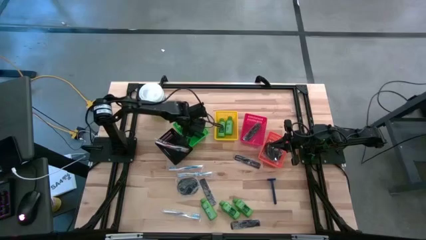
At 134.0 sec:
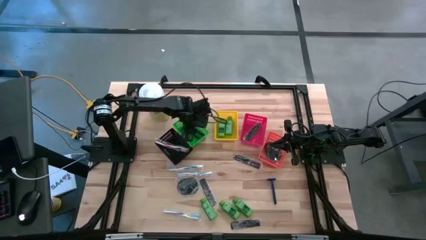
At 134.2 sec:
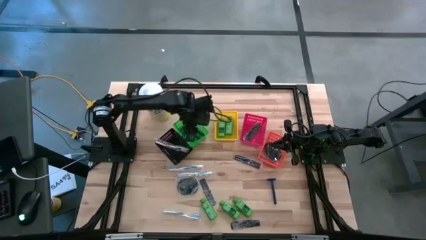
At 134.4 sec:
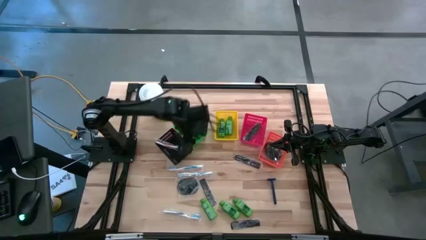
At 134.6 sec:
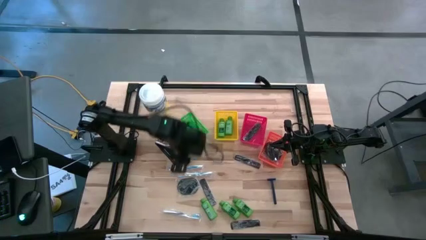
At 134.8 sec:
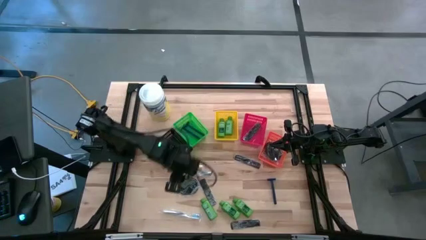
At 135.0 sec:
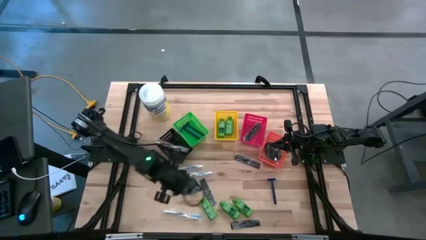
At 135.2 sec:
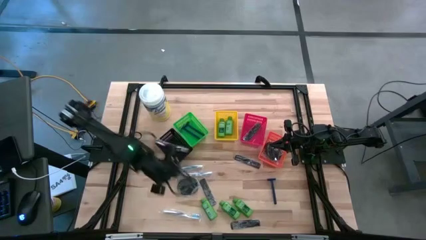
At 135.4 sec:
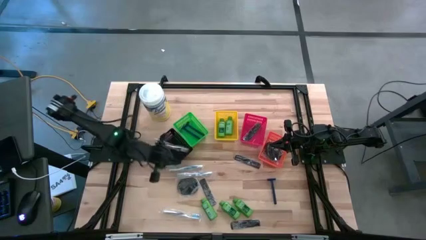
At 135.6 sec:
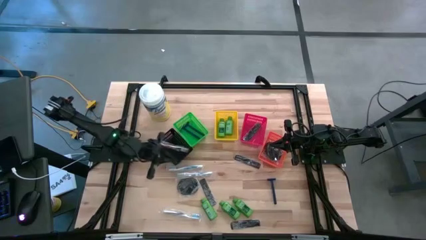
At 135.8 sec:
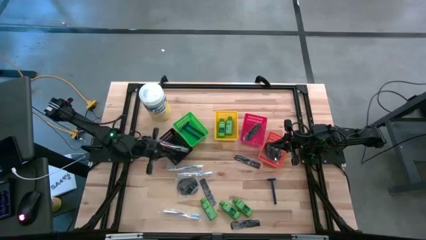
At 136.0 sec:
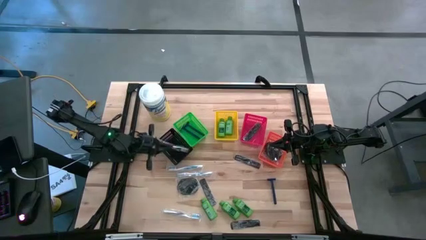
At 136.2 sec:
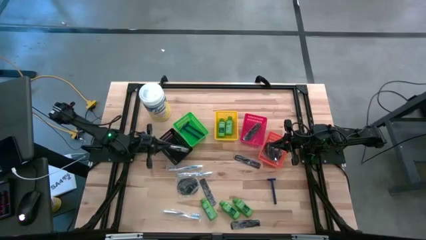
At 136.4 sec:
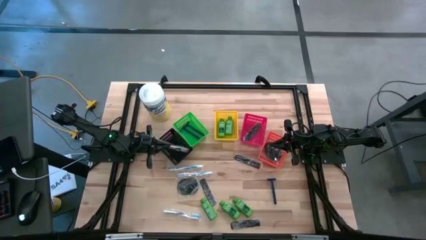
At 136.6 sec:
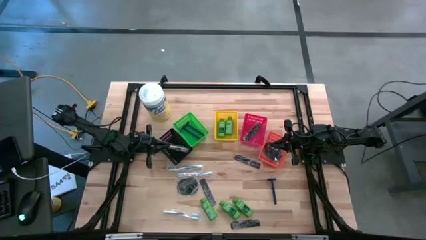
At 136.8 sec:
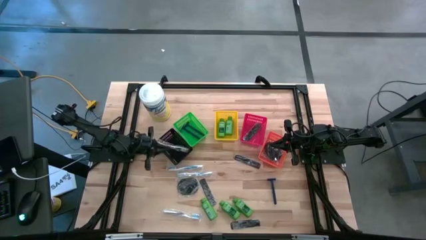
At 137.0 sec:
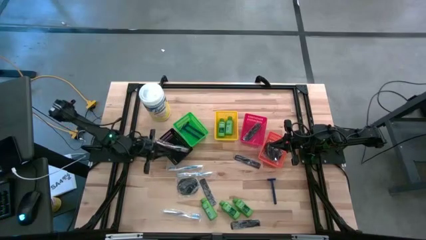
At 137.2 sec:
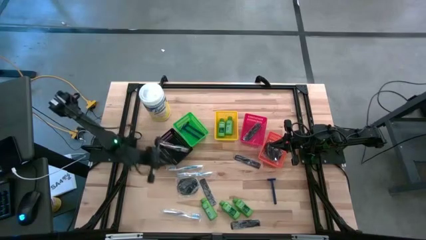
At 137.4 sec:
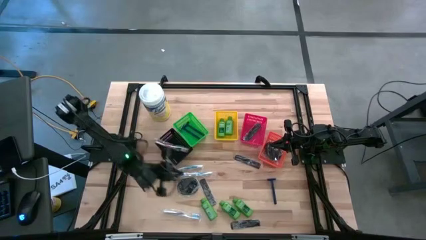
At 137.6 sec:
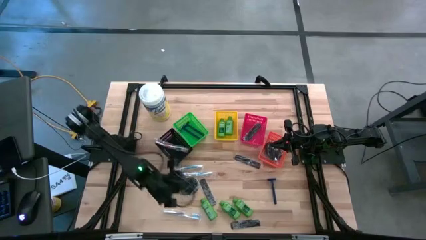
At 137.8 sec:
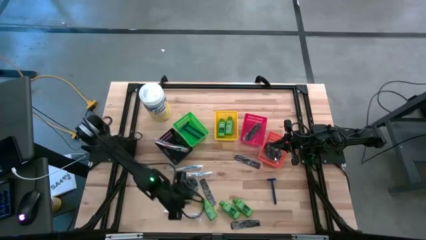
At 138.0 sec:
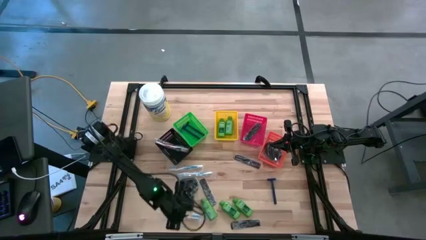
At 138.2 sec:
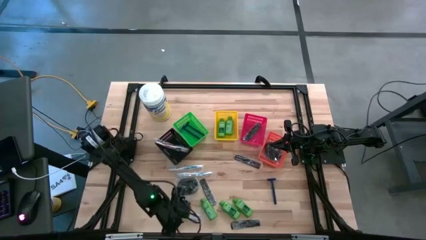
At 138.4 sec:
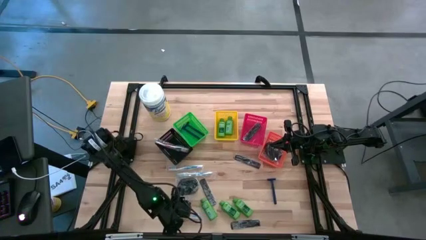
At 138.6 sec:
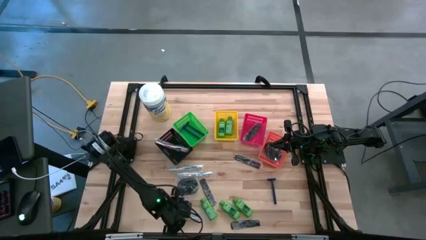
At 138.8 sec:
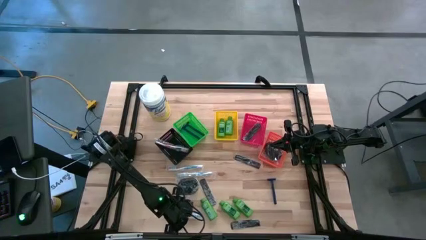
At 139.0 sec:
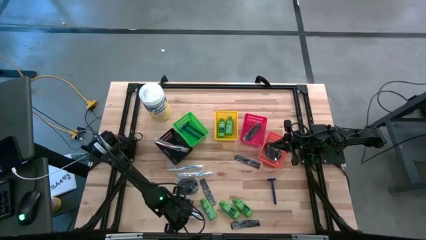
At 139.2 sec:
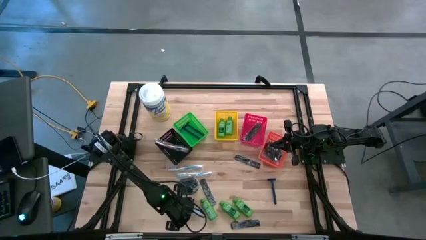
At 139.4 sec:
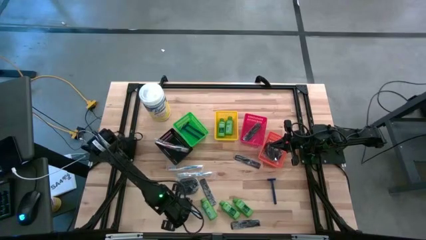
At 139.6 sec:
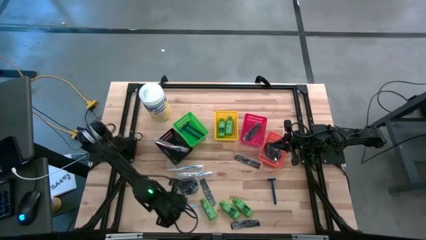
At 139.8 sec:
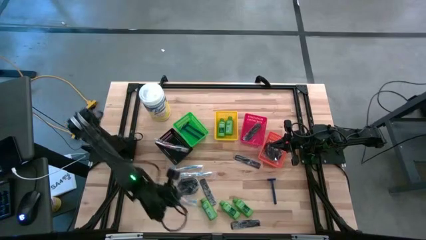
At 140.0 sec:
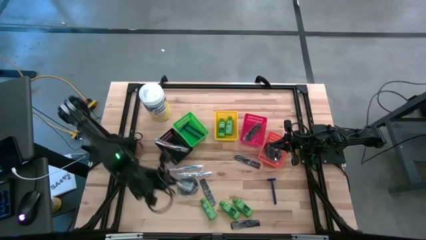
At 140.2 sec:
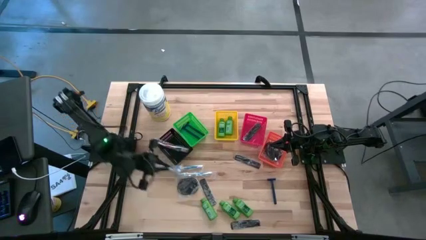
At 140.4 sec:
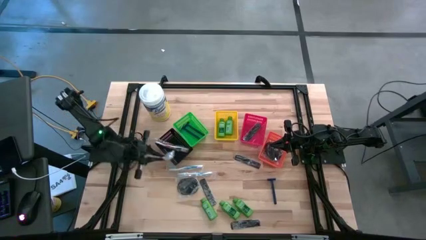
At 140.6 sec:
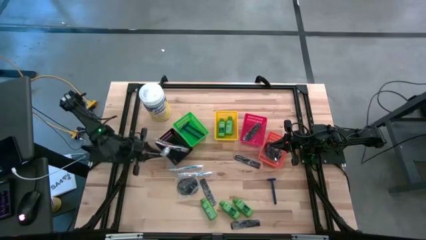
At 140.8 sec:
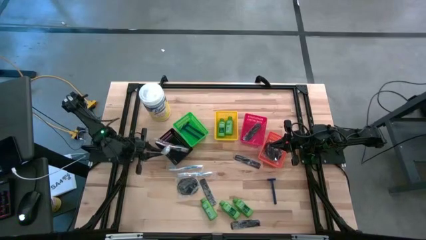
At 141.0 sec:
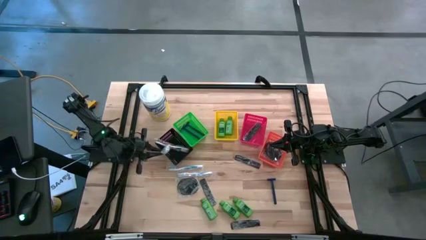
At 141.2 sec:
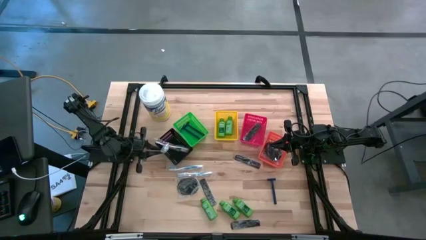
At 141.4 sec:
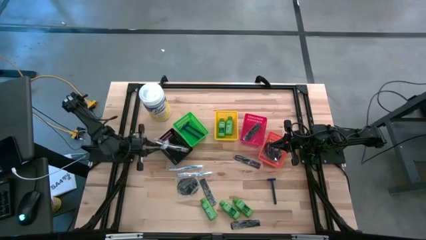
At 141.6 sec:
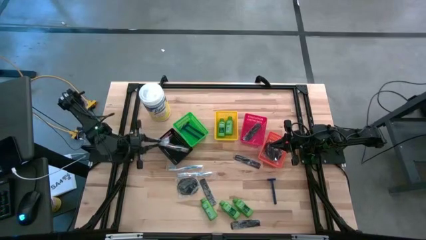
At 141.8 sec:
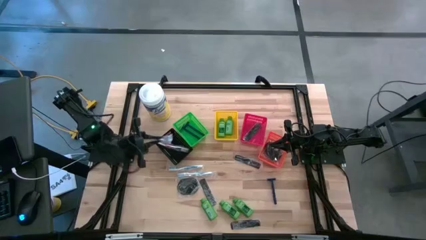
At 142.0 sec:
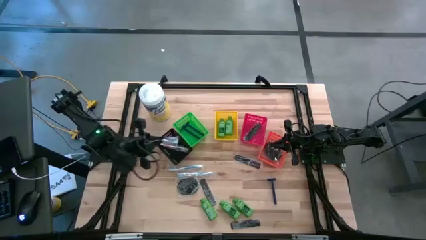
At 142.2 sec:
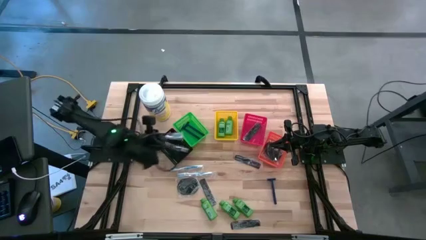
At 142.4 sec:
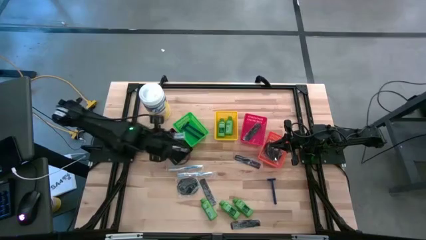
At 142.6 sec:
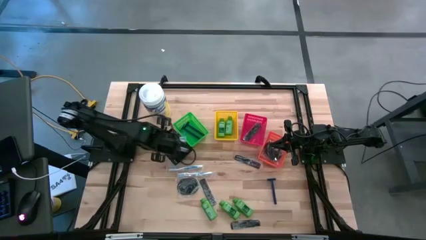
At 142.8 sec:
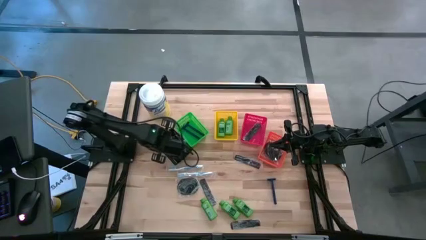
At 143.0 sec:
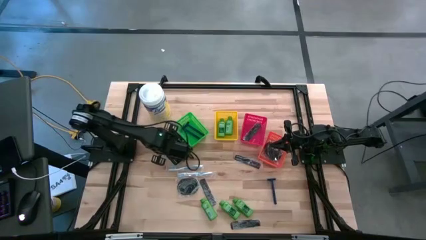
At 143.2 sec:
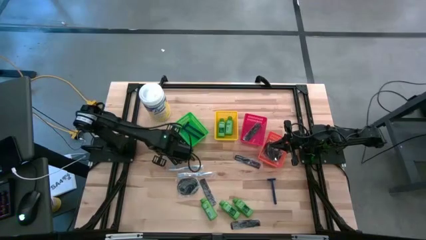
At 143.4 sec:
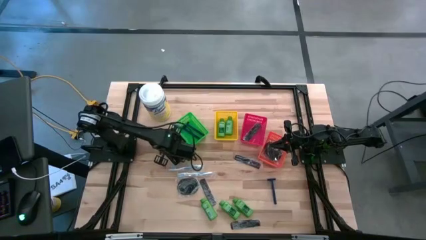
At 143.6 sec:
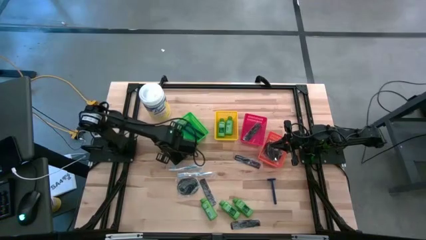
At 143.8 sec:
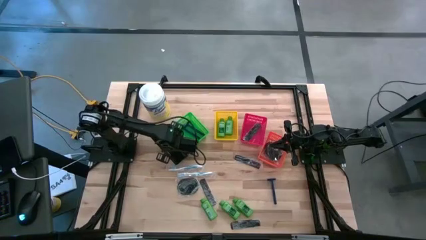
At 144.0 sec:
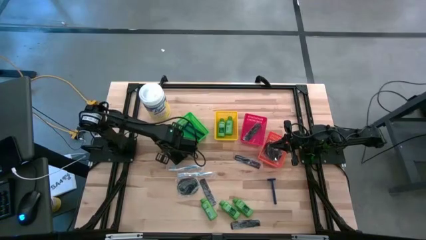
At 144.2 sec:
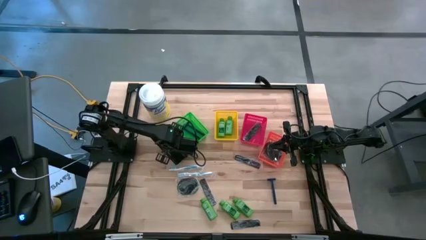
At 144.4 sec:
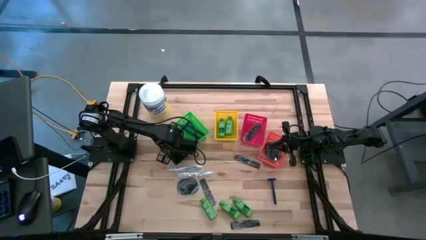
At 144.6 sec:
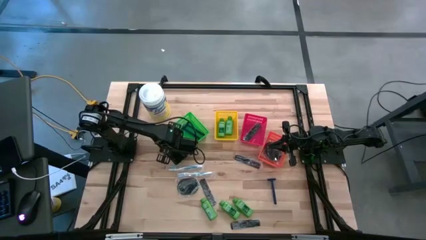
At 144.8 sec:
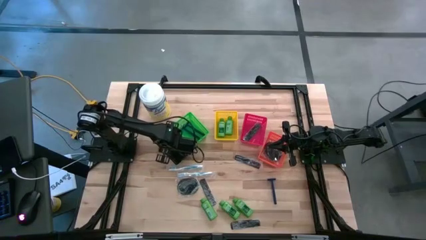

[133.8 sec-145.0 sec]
Task: Pick & Place Travel size toiletries
Put the bottom blue toothbrush into the black bin

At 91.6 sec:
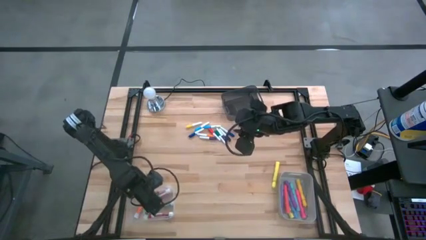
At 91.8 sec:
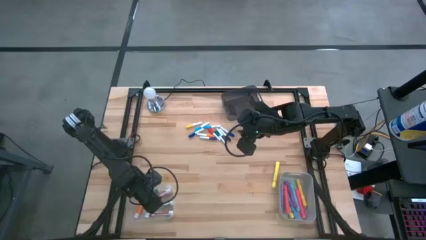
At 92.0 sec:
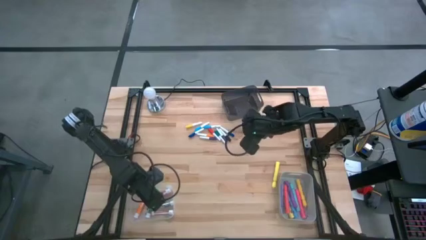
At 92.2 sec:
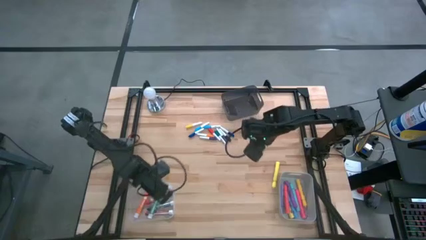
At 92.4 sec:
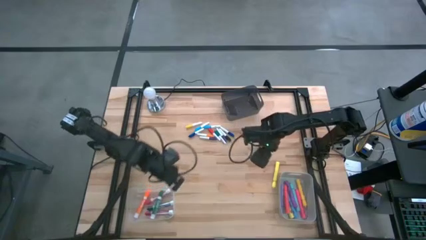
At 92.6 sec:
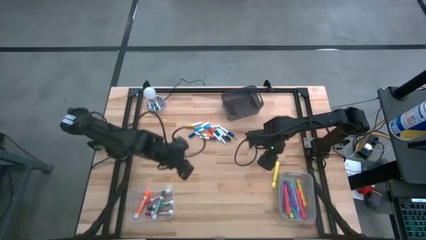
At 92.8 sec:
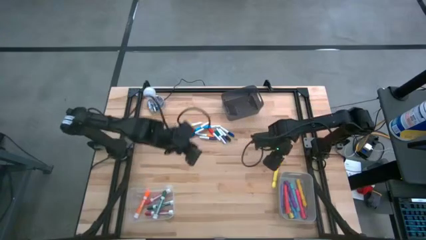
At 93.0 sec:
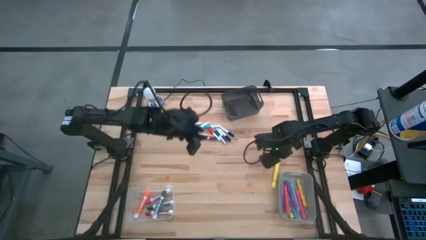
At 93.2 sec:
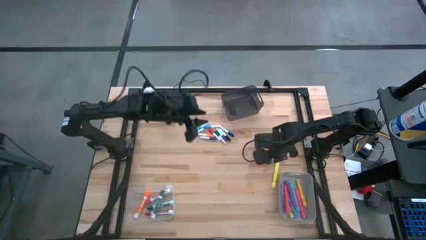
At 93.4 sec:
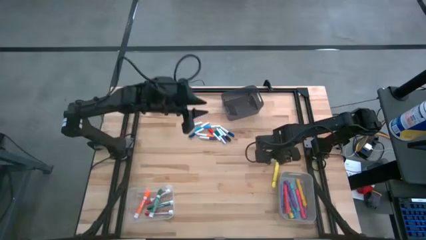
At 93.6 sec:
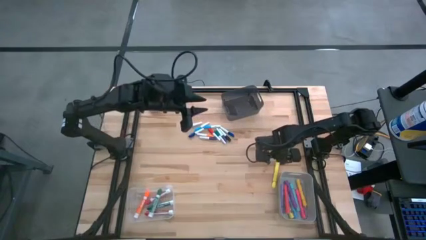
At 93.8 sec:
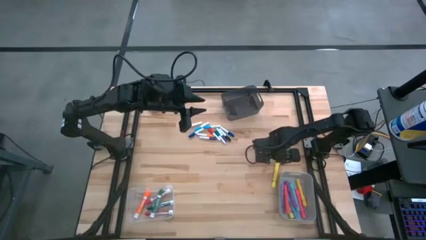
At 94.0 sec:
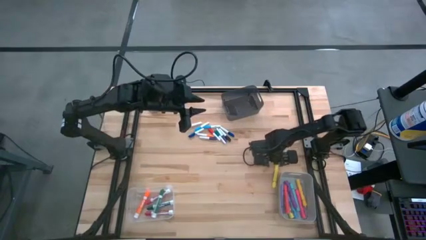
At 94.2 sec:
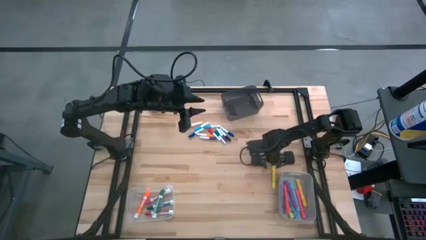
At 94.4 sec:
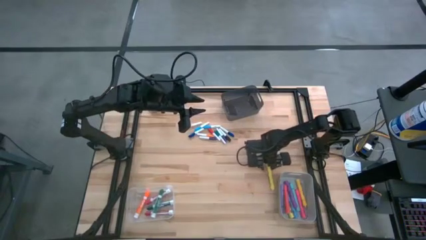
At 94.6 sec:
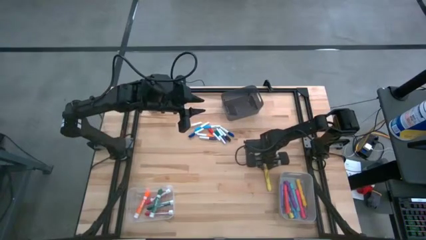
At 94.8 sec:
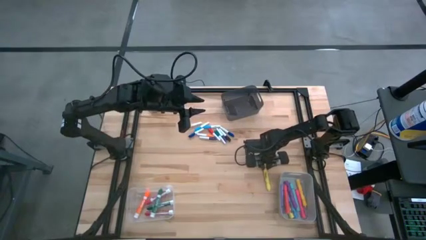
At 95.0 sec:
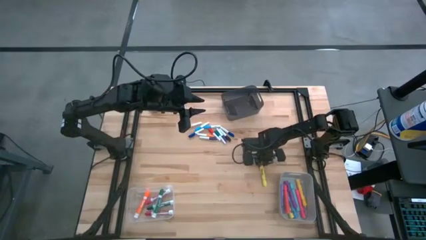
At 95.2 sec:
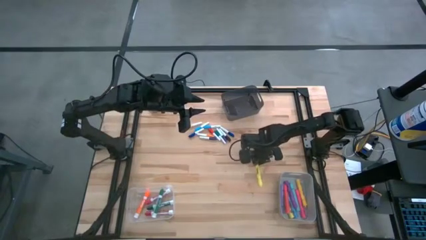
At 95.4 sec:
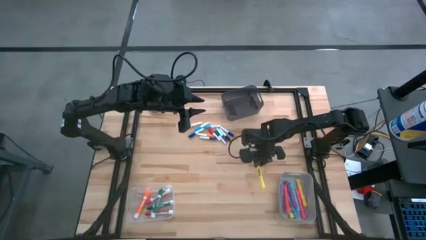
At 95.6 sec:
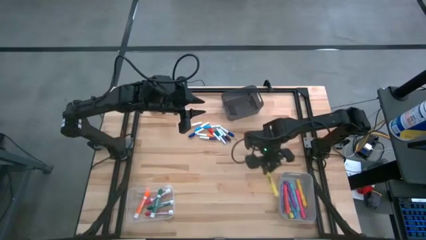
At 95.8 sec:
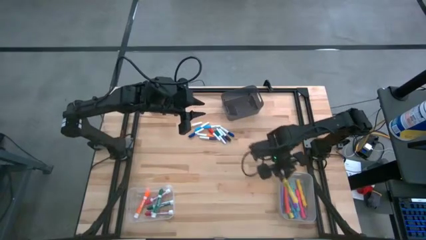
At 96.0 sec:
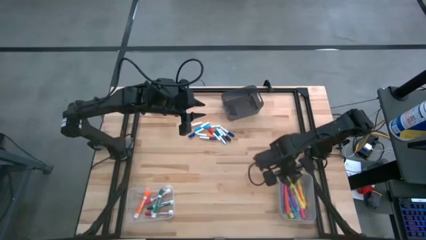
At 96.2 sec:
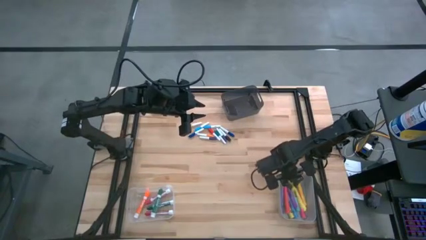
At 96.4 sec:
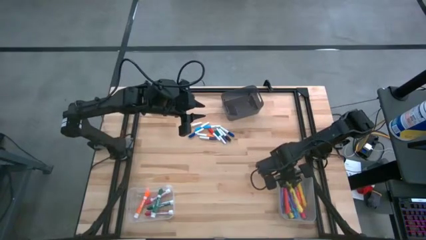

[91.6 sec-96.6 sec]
Task: Pick & Place Markers
Put the yellow marker into the gray bin
